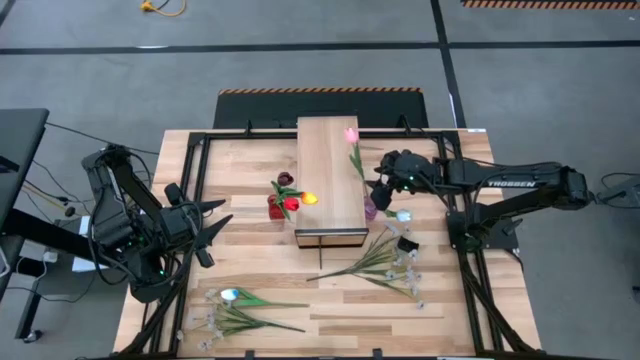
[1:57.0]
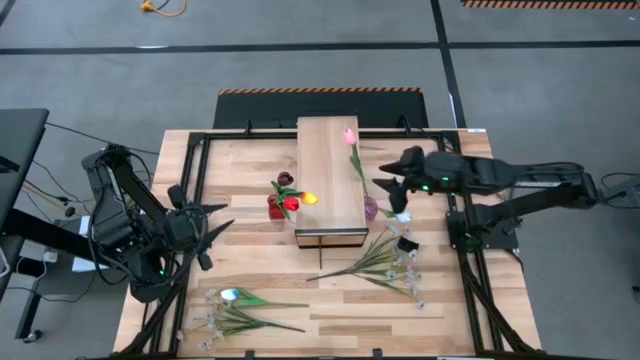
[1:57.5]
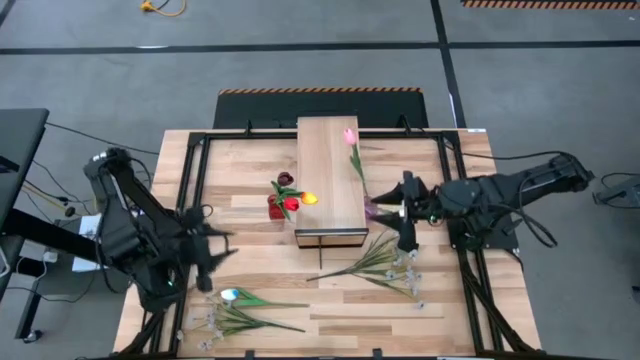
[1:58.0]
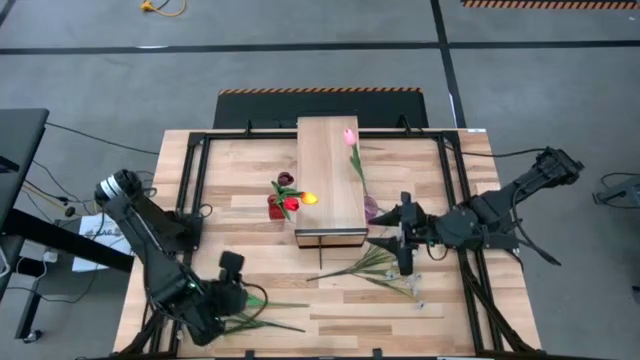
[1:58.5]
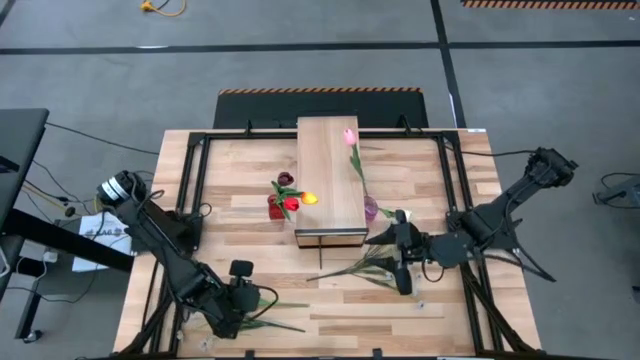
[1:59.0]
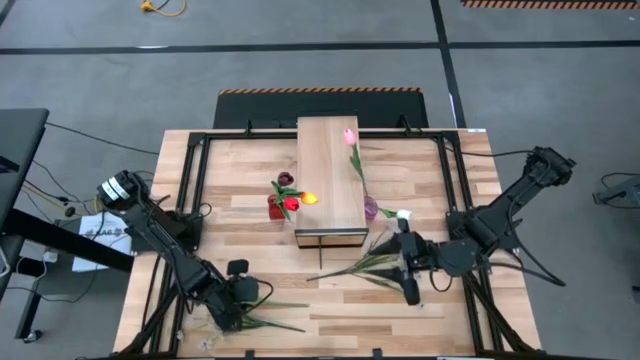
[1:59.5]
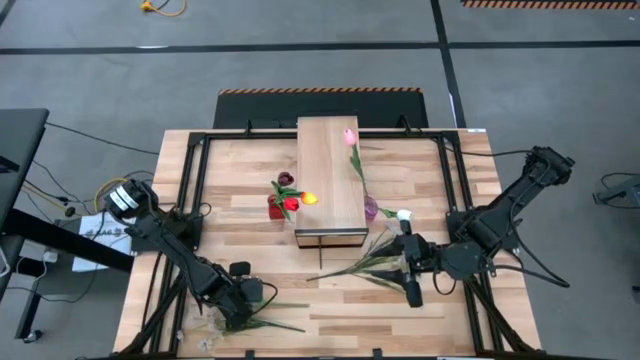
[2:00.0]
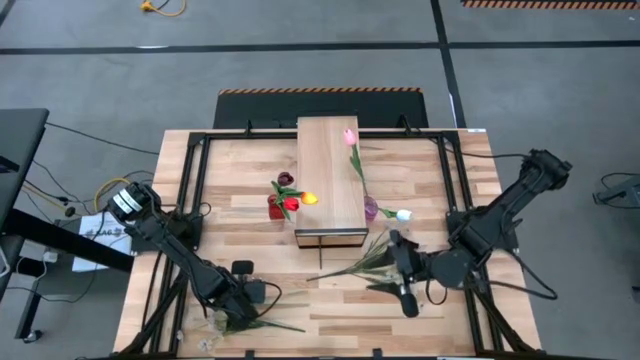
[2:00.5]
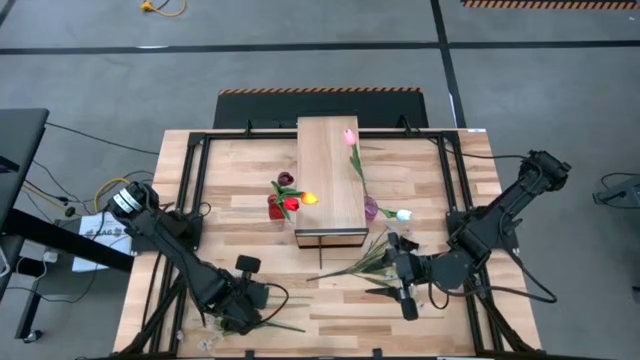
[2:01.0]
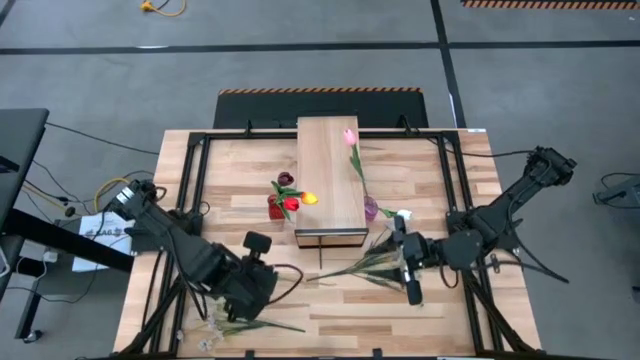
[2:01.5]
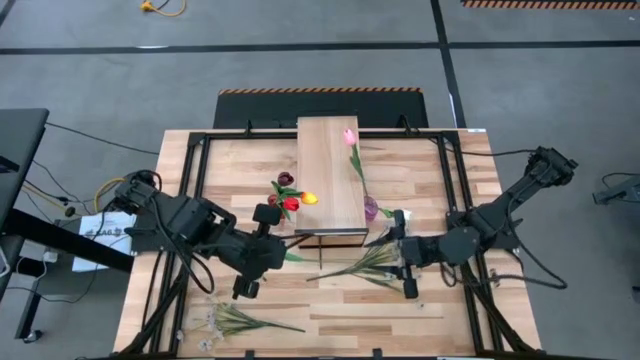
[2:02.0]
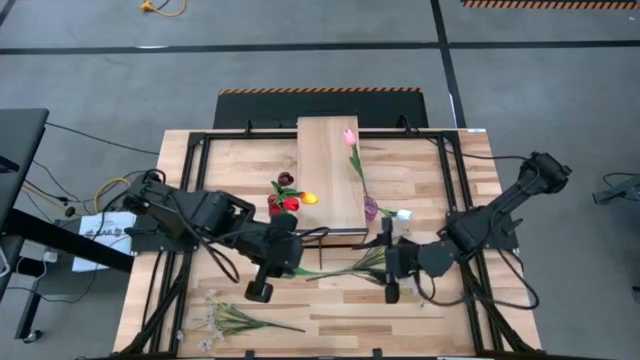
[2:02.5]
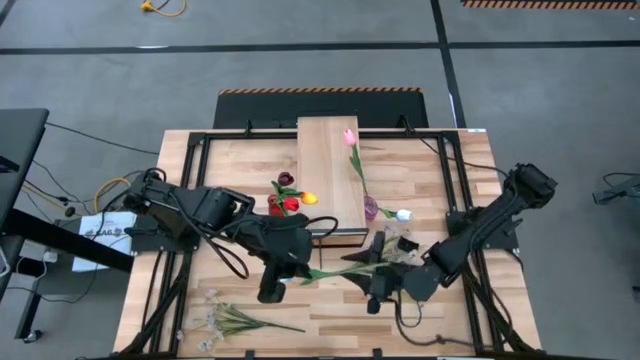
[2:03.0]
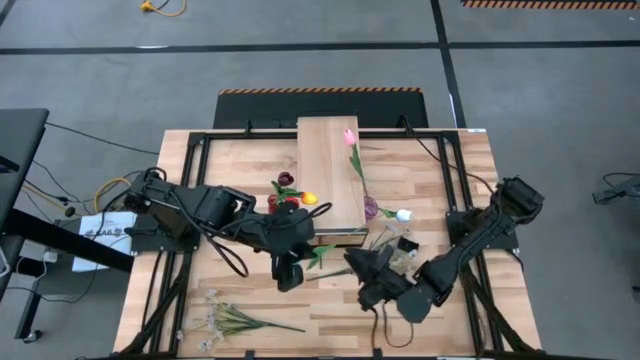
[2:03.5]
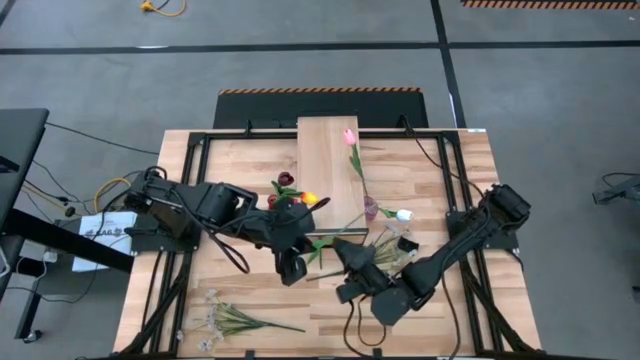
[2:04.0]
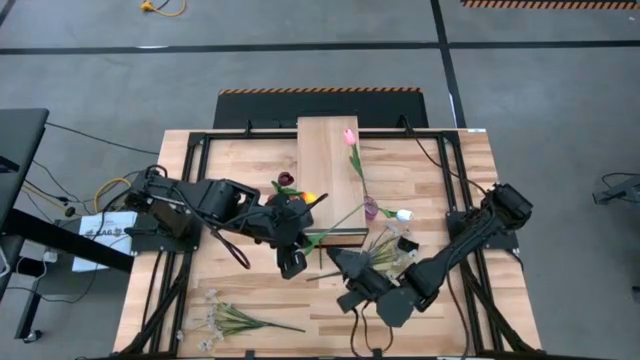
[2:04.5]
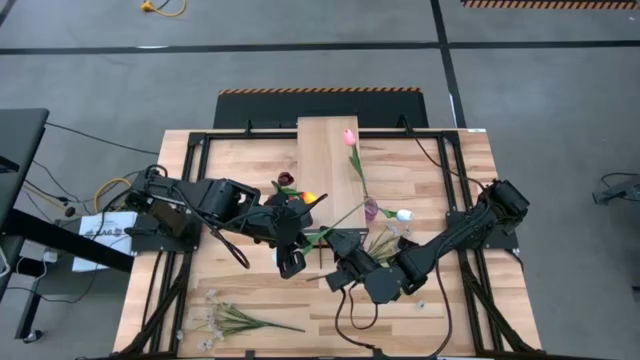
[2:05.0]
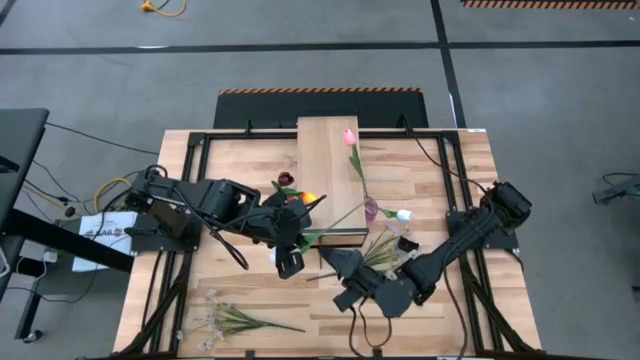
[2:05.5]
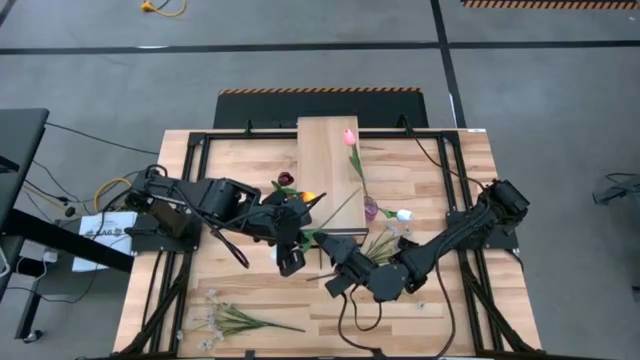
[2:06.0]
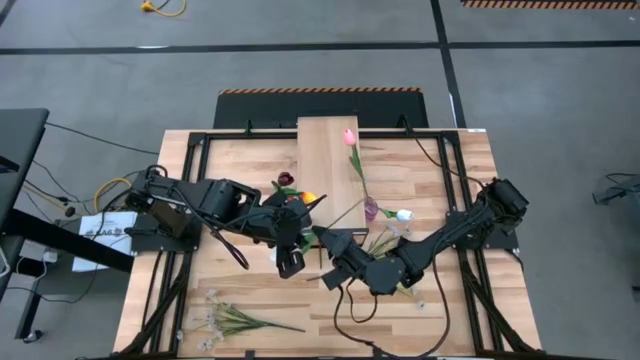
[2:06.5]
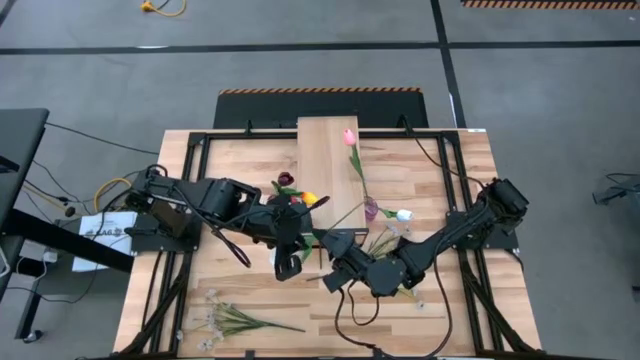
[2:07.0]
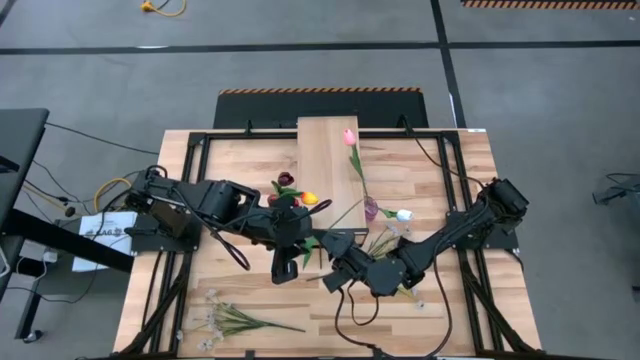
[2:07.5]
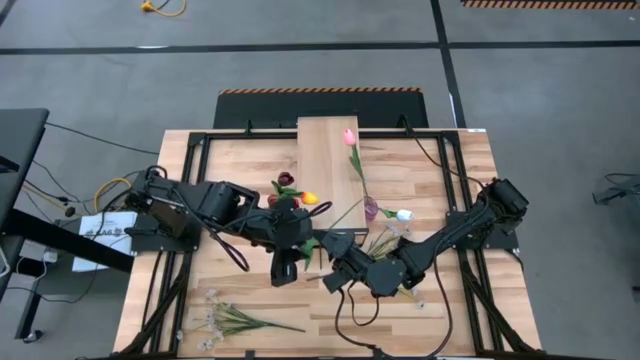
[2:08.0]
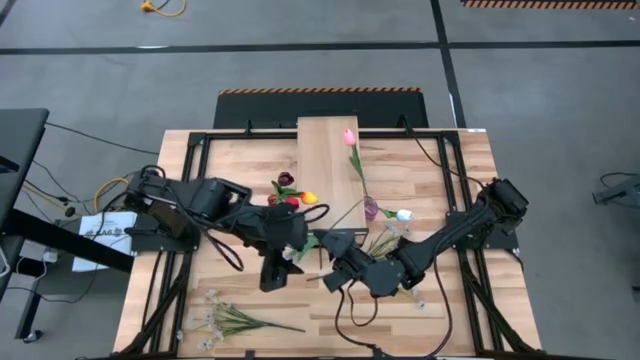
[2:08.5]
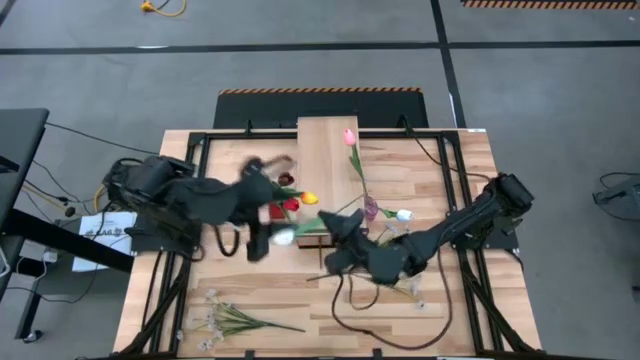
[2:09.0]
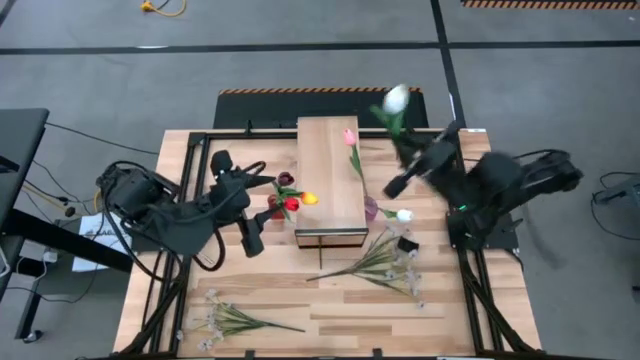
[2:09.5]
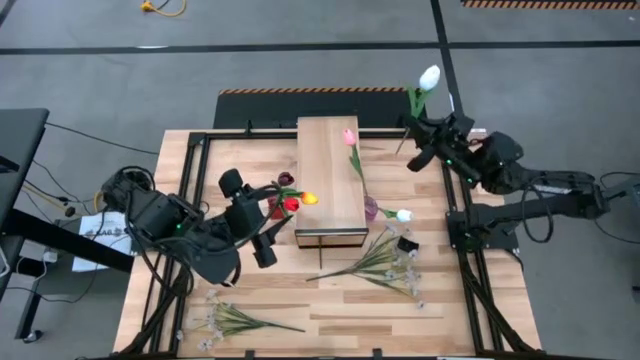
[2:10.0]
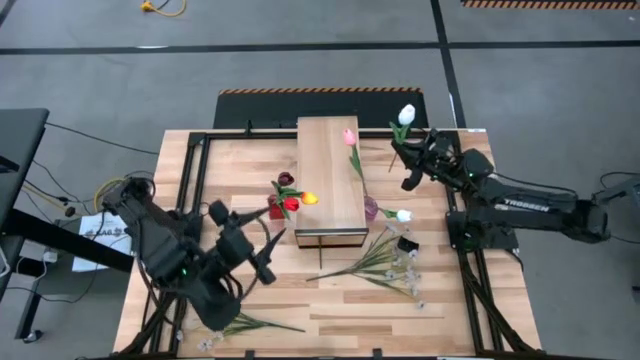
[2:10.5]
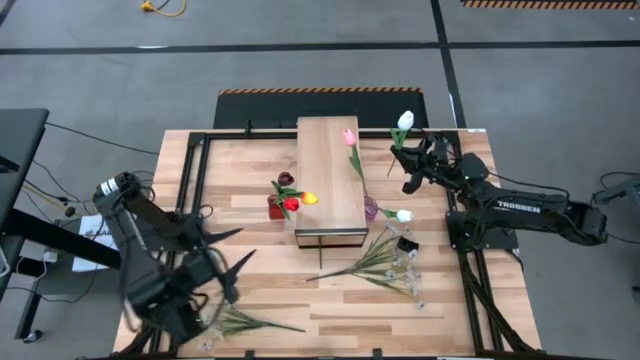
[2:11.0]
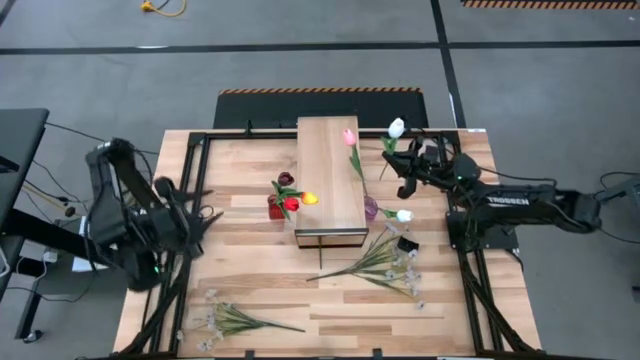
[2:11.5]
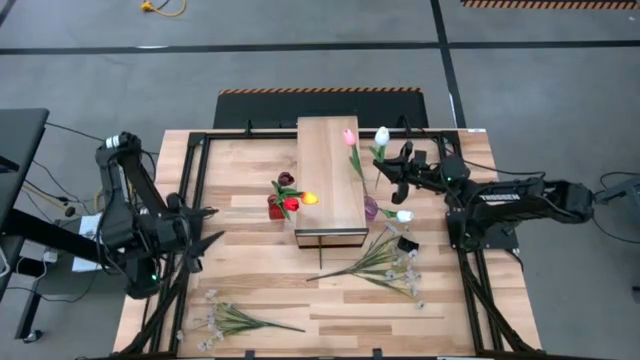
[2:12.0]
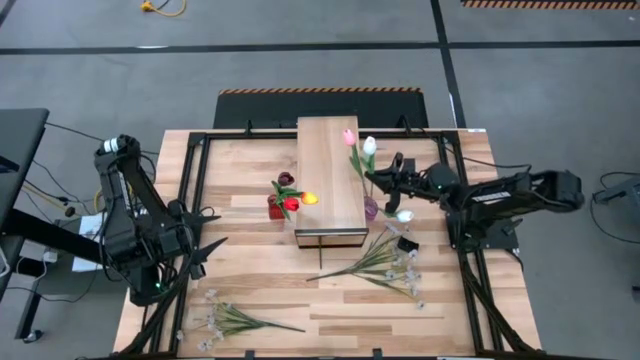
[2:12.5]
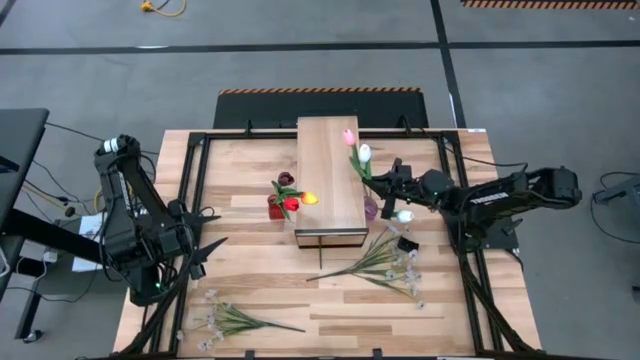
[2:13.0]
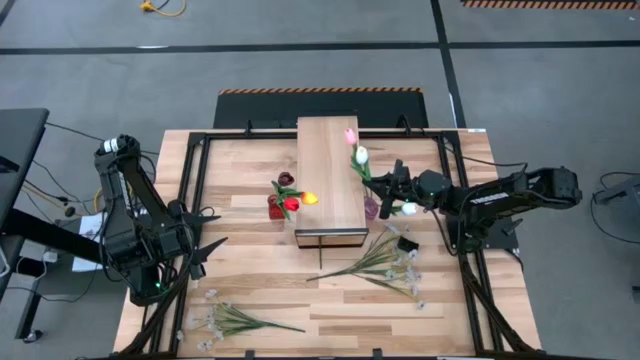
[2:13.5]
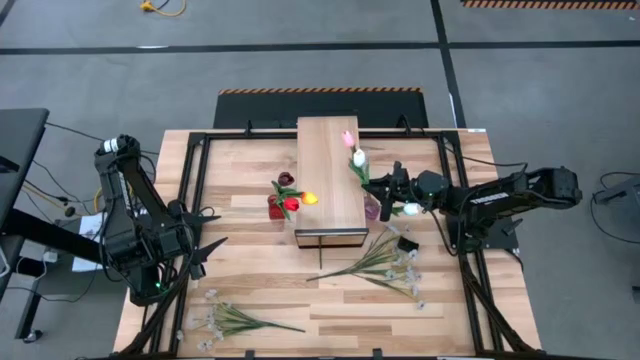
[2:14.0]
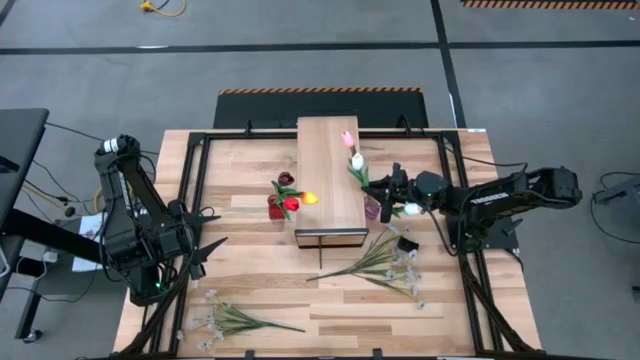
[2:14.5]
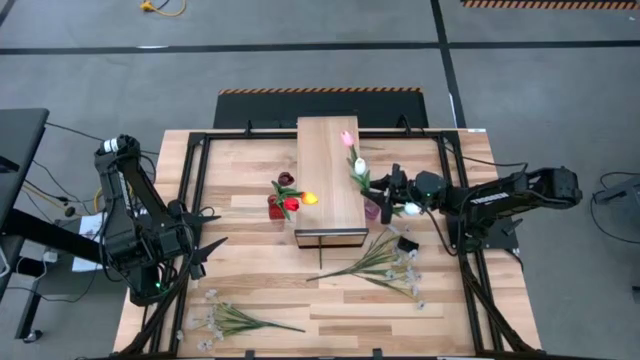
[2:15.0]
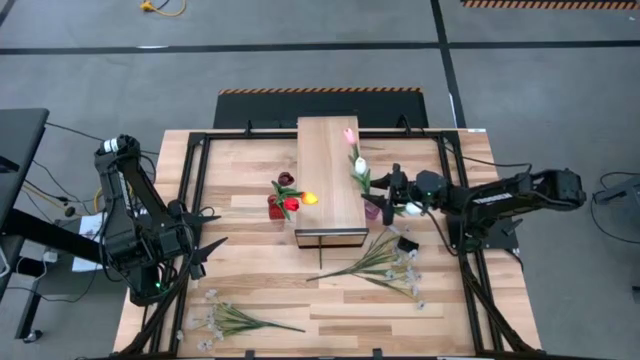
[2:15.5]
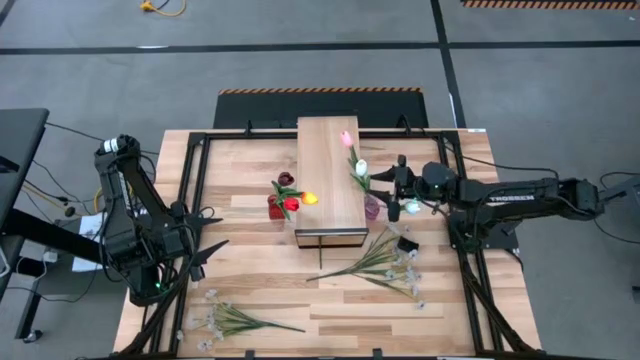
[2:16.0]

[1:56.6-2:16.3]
Task: Pick and place flowers into a vace then onto a shelf
Put the light blue tulip into the purple flower vase

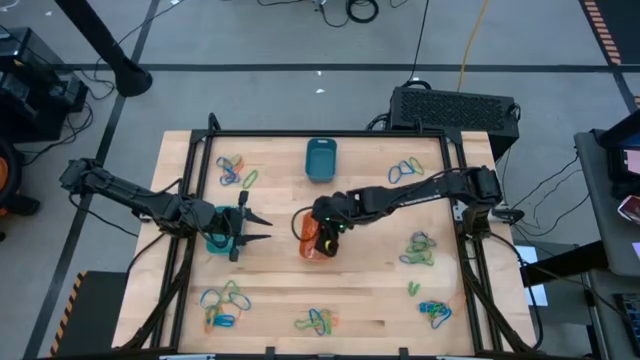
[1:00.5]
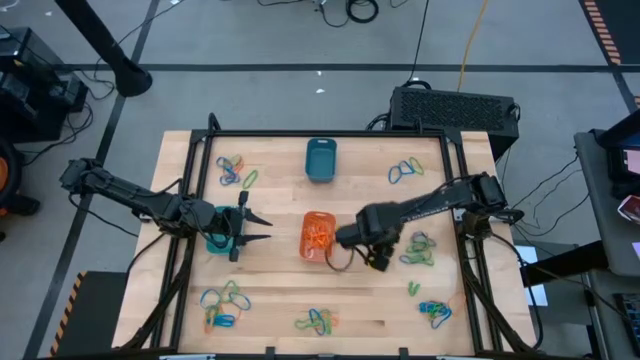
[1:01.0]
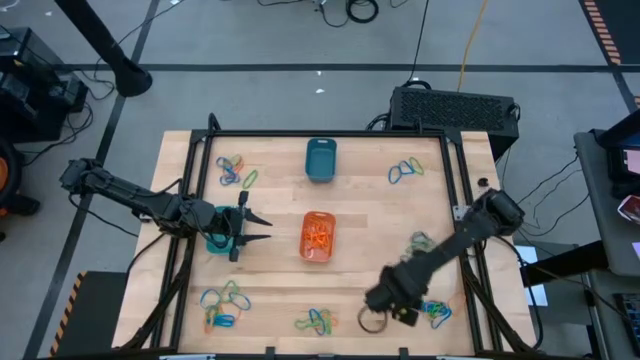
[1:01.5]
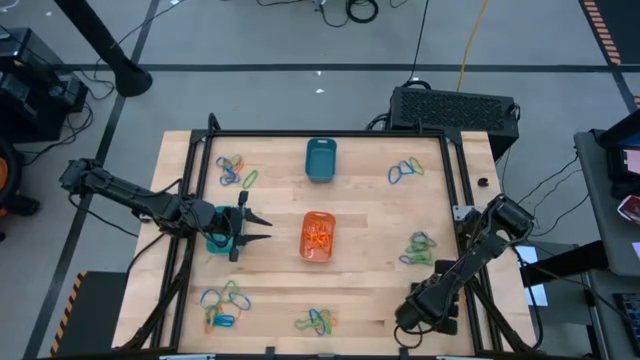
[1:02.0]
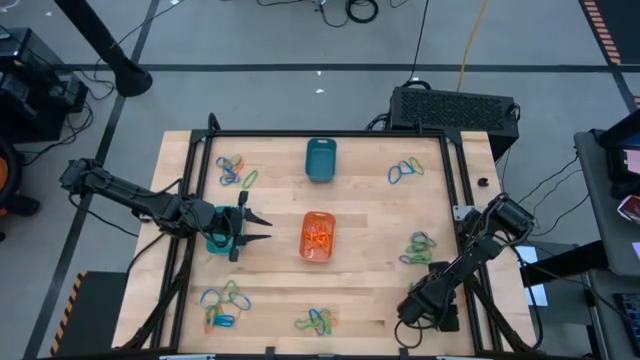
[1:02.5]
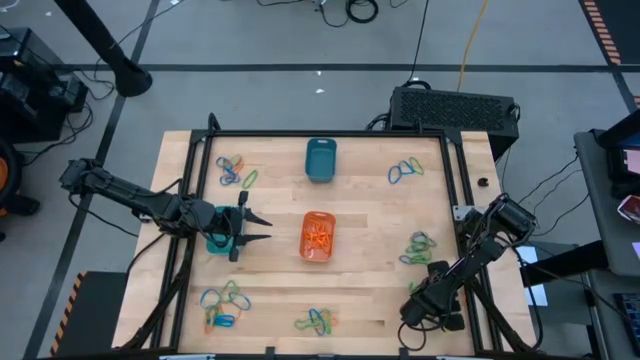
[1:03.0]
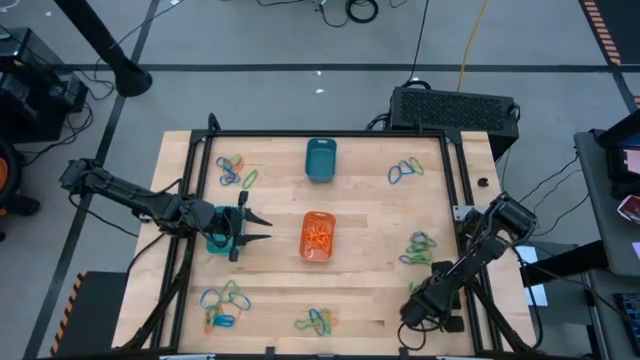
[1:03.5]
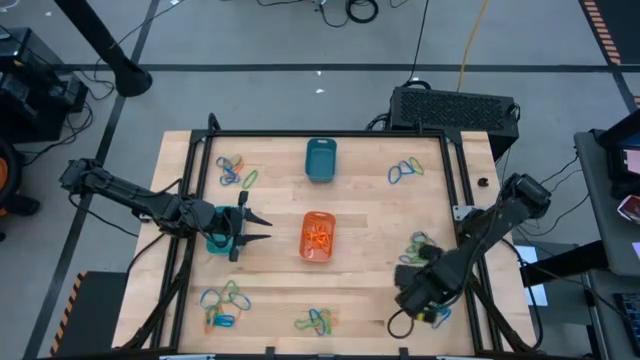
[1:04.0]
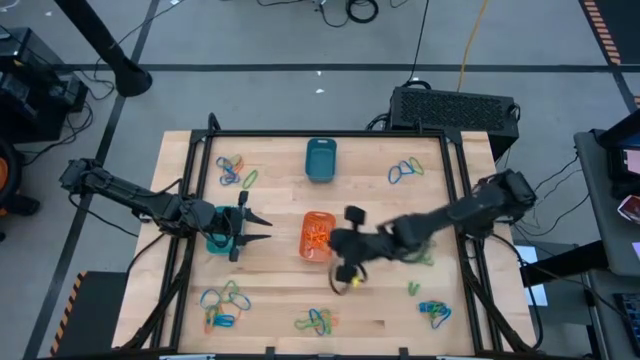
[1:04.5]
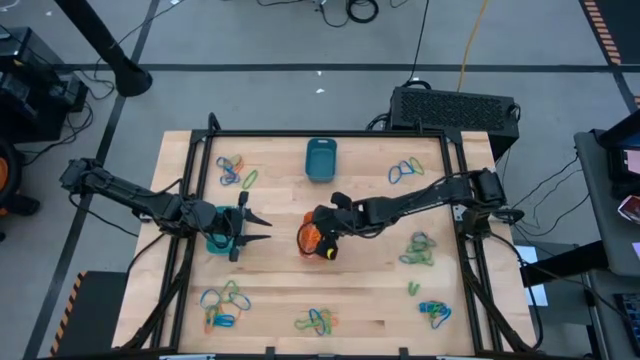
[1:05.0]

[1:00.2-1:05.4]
Task: Sort rubber bands into baskets
Put the orange rubber band into the orange bin
